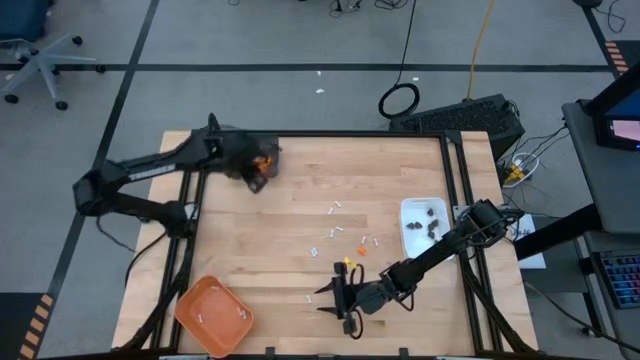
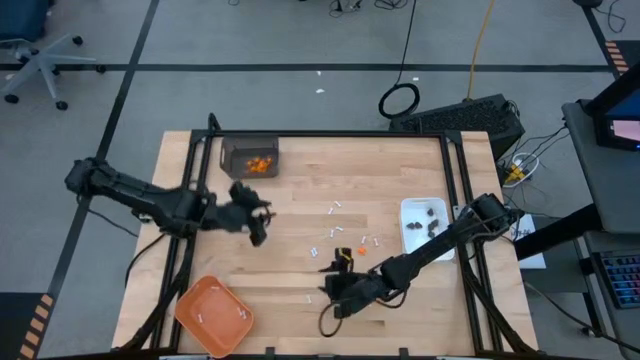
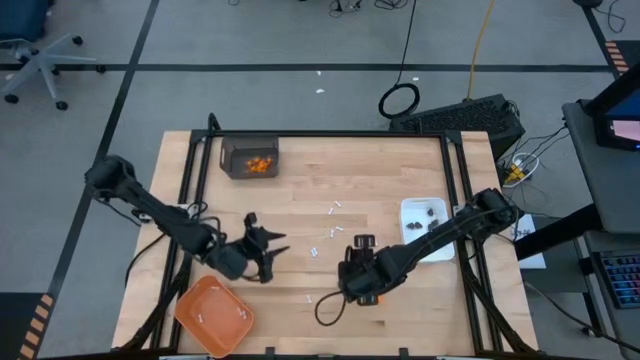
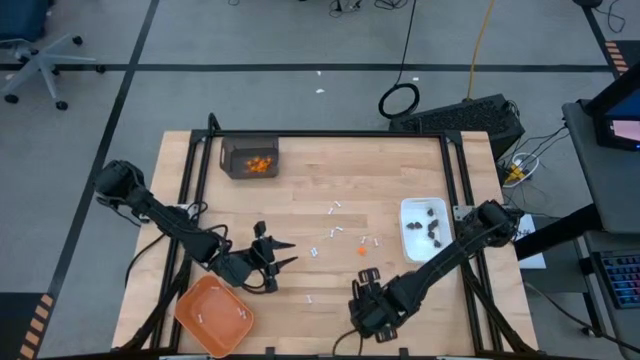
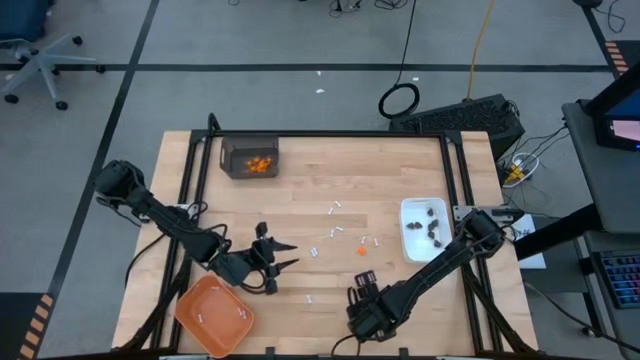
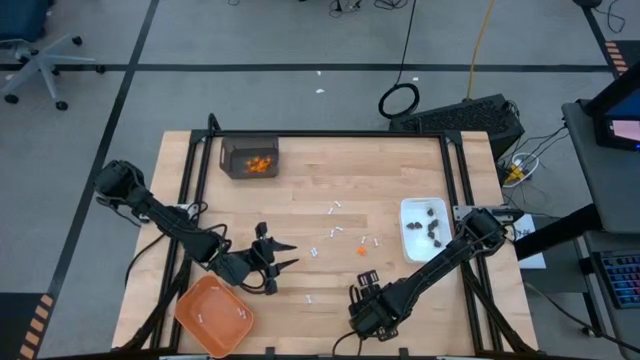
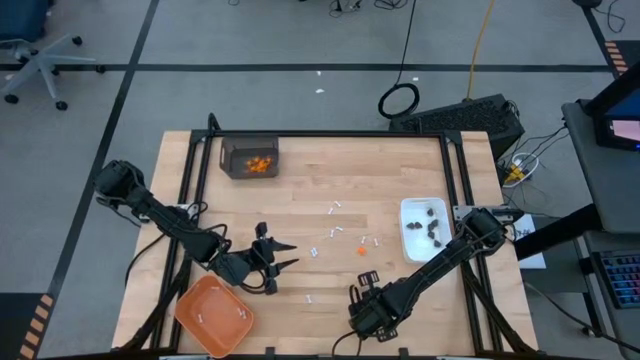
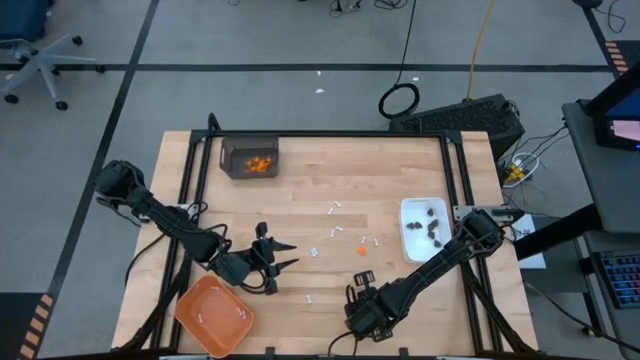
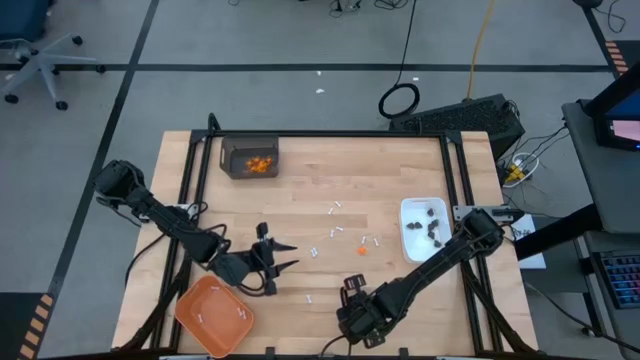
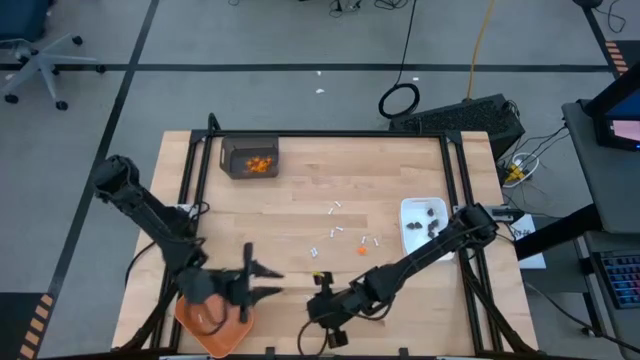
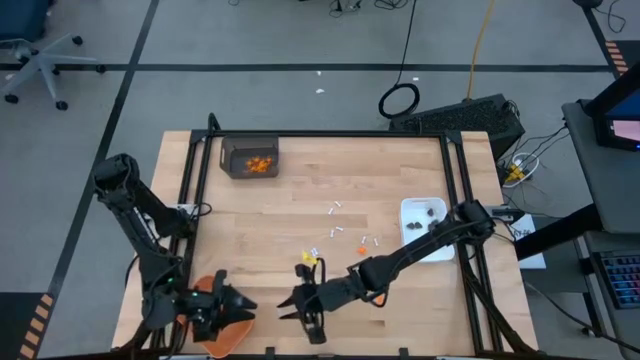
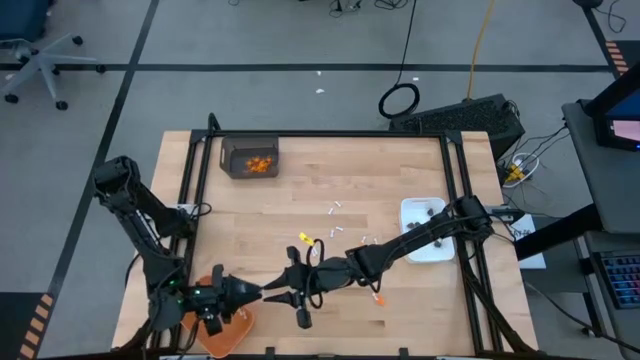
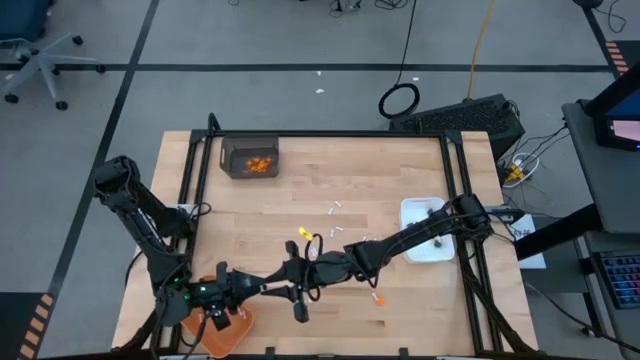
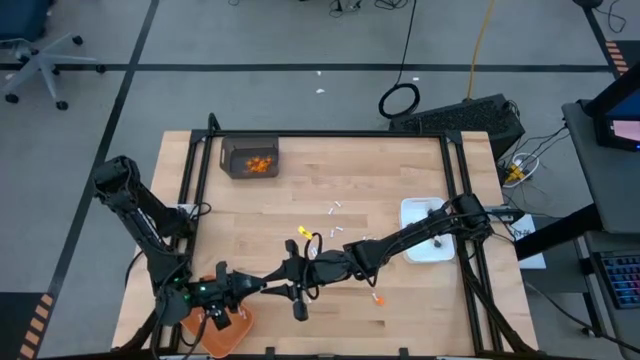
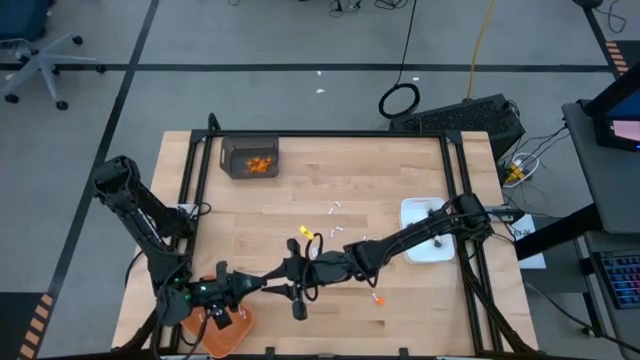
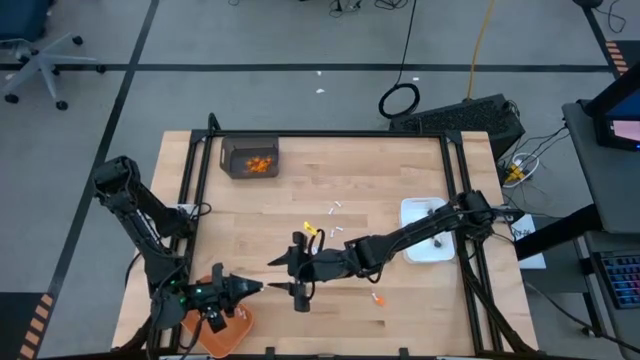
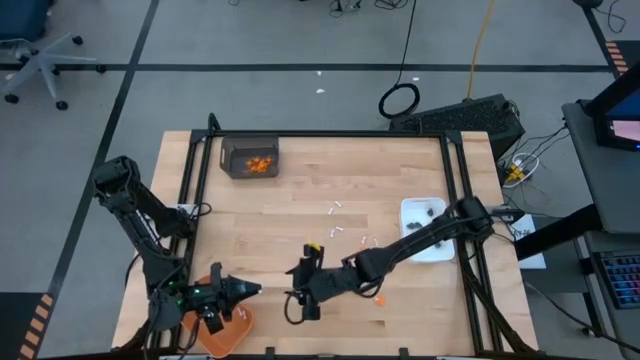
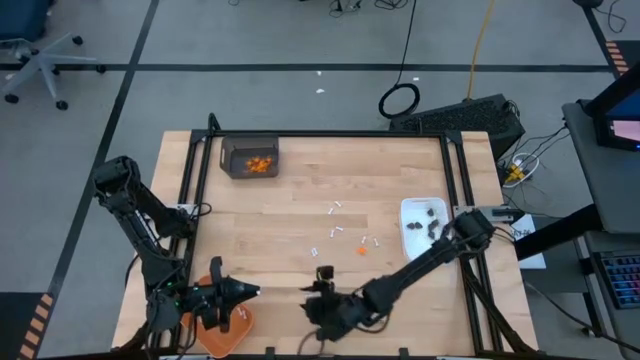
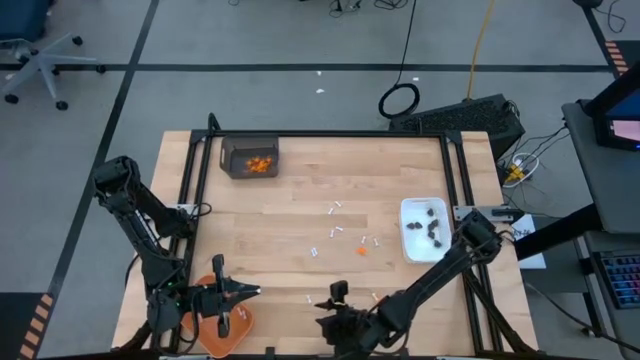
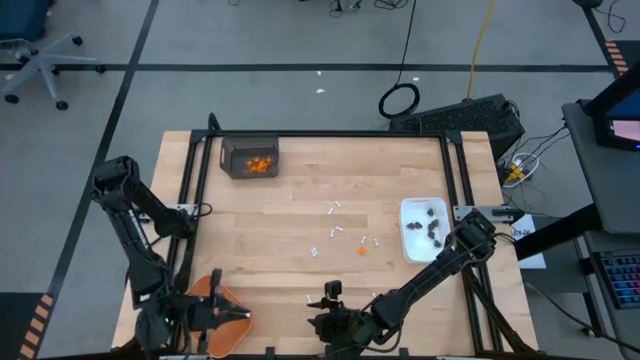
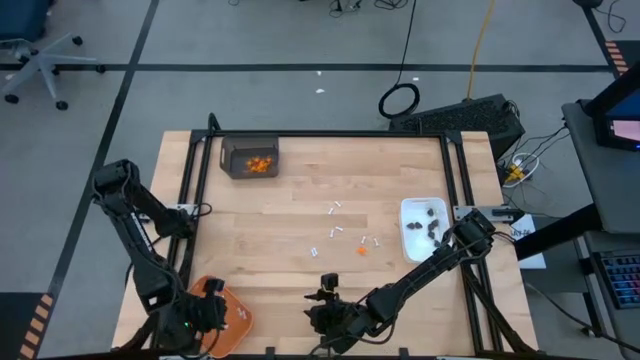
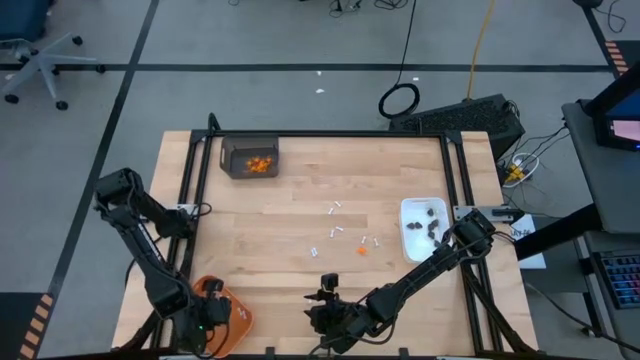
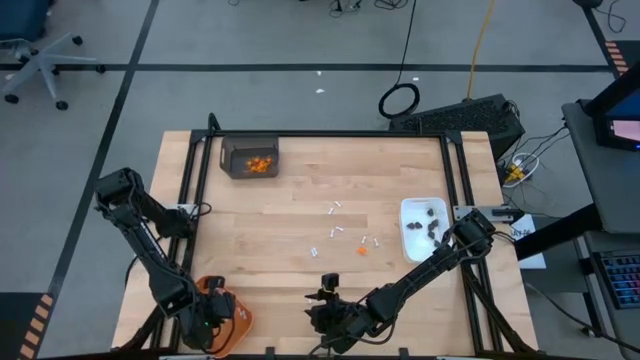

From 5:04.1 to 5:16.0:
Task: Sort Halloween decoration
Put the white bone toy into the orange bin

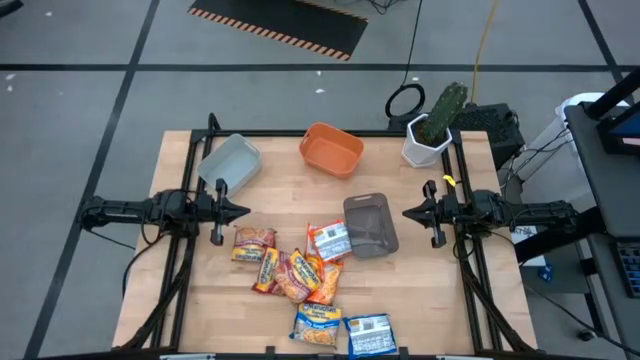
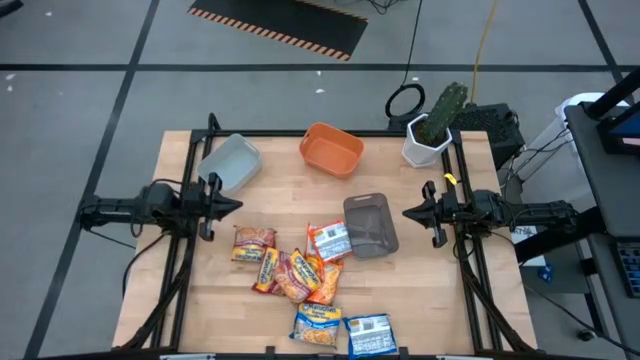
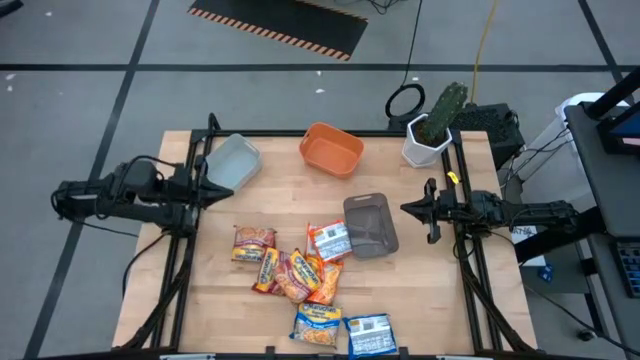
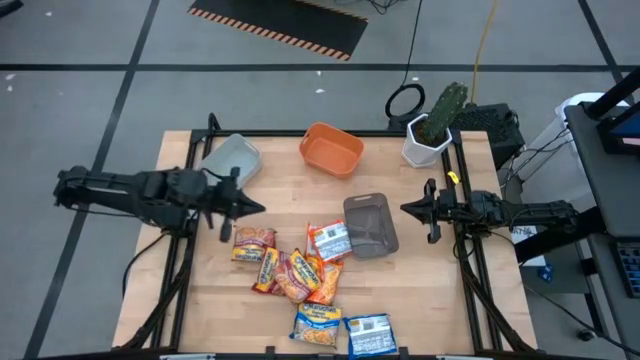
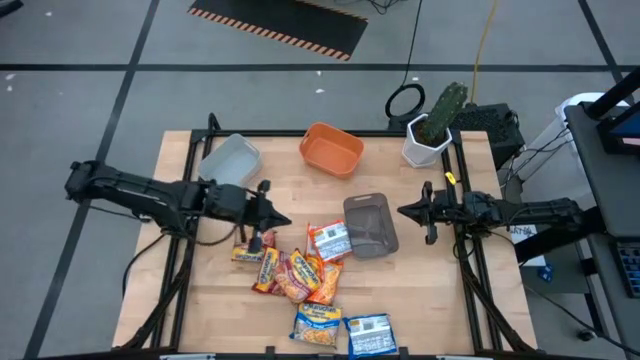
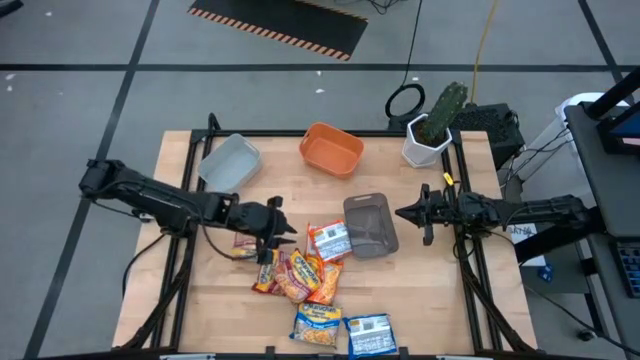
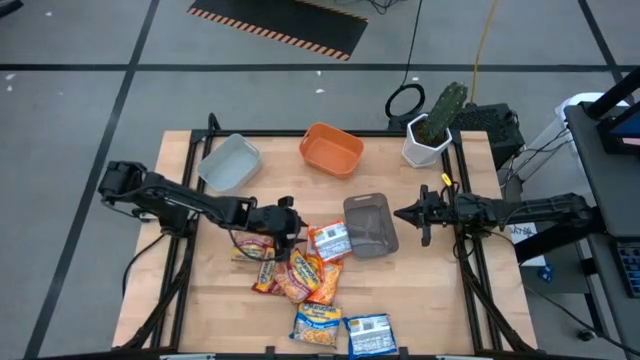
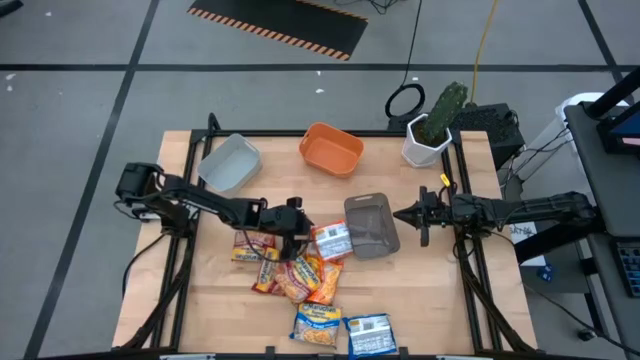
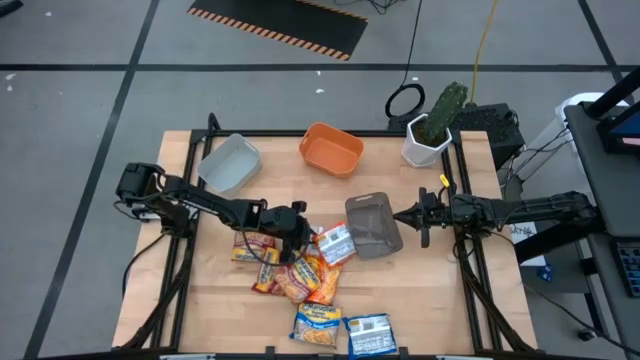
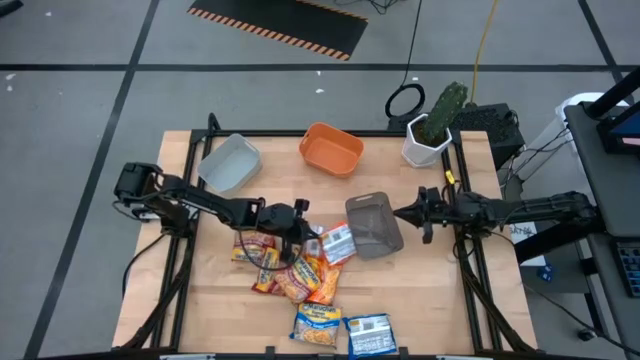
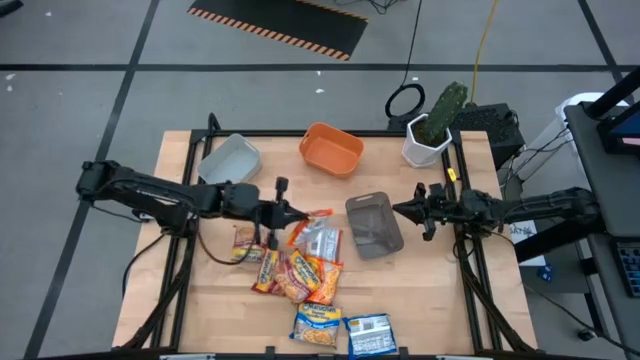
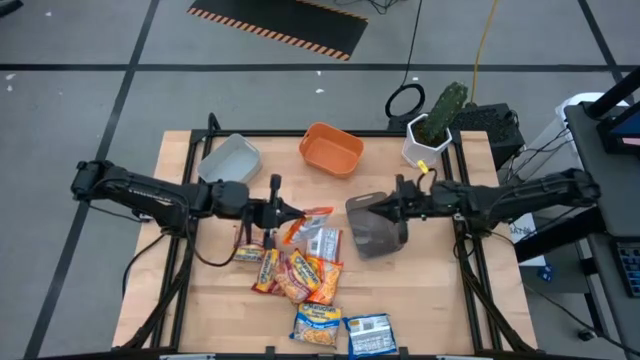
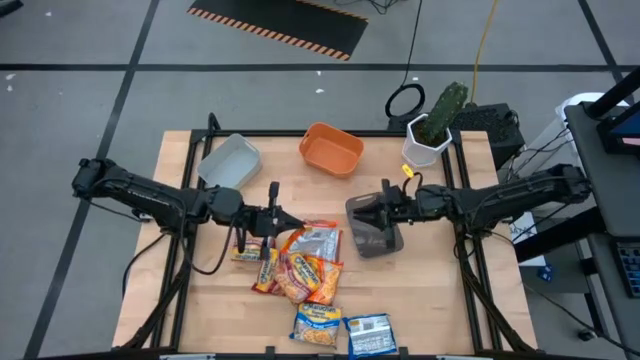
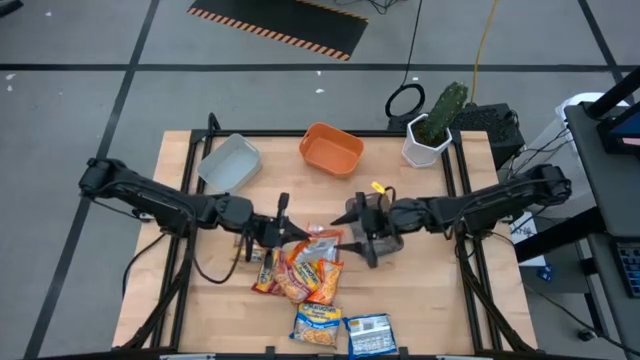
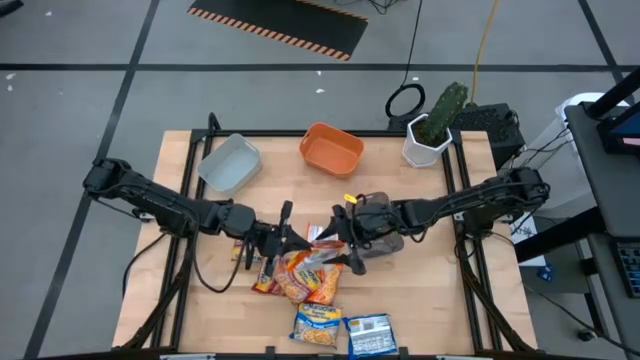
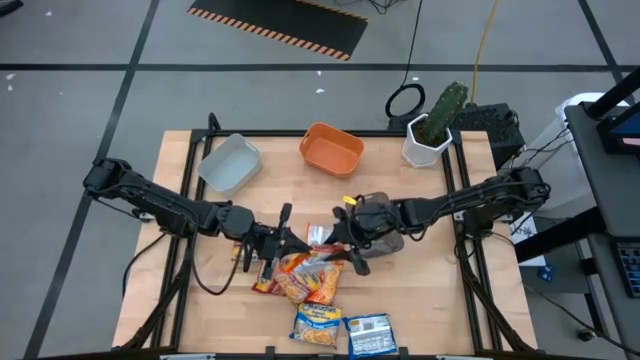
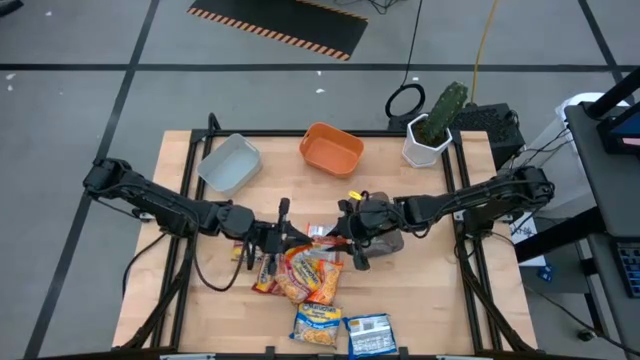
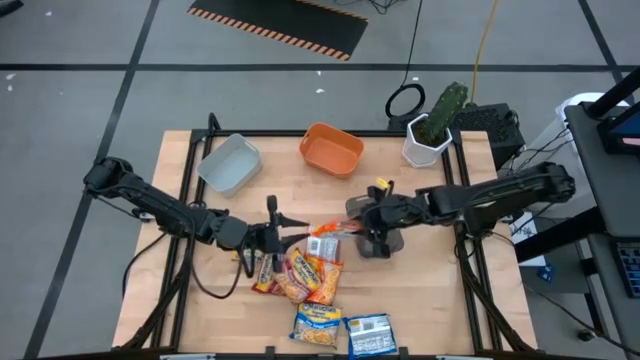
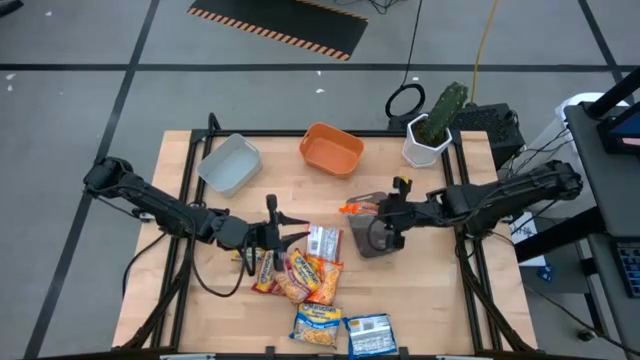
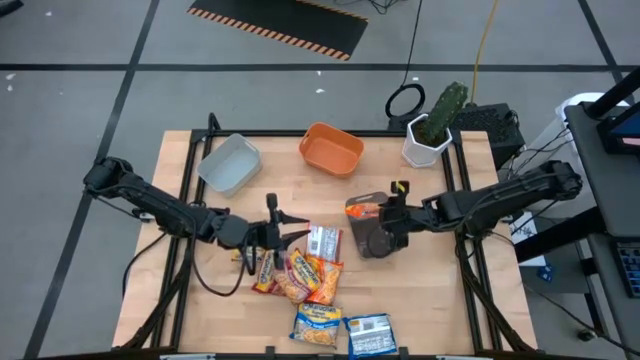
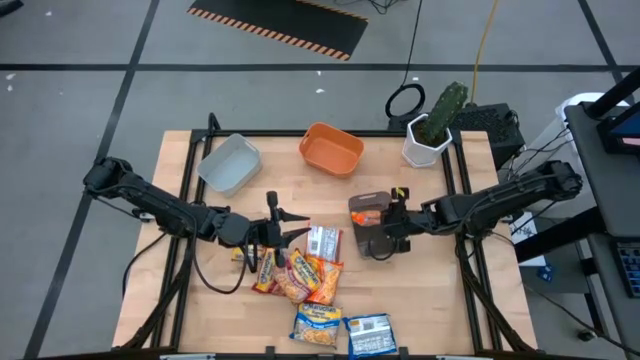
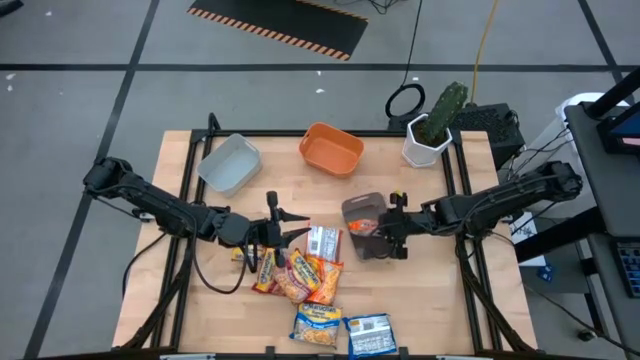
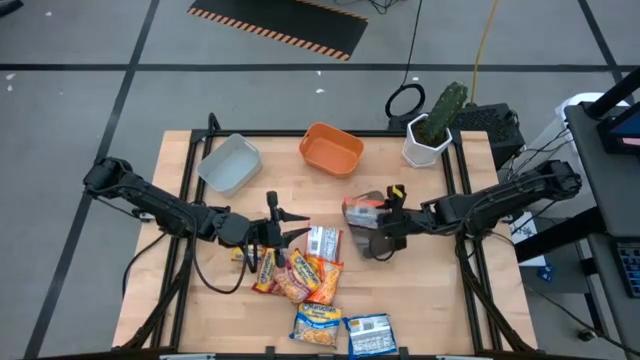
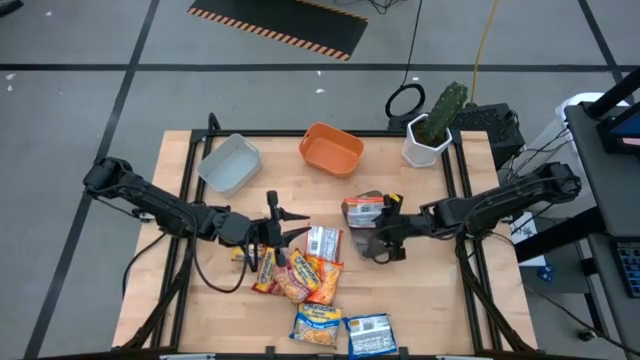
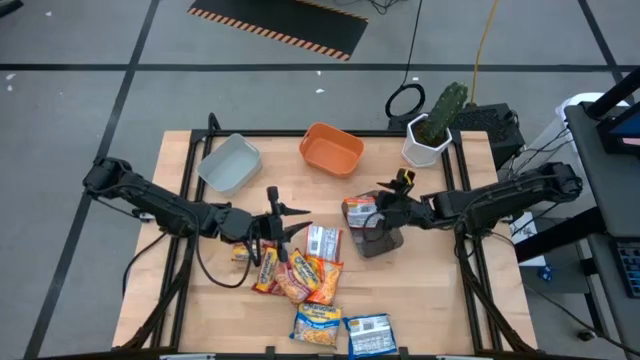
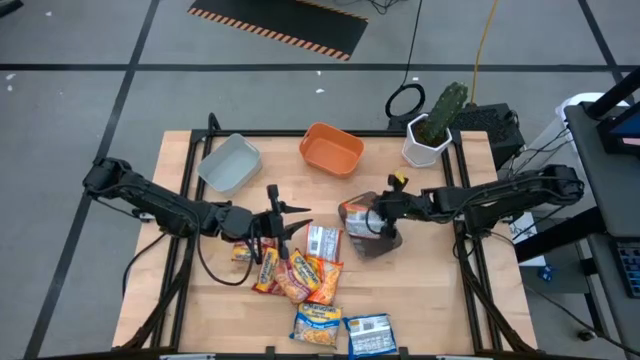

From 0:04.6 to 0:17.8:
Task: Sort Maruchan noodles
Put the right orange noodle pack into the black bin
